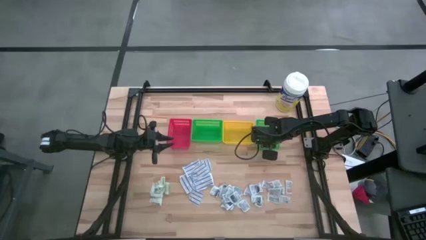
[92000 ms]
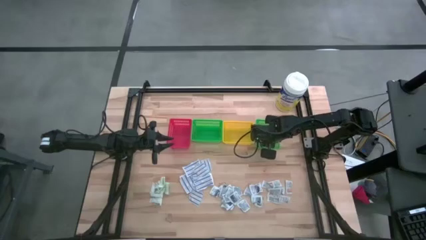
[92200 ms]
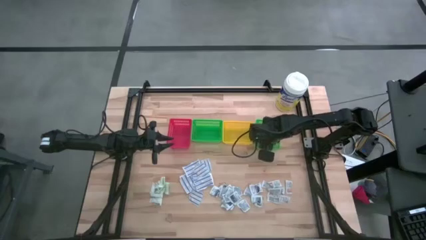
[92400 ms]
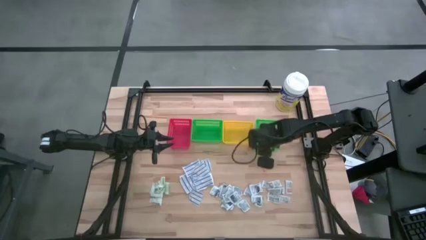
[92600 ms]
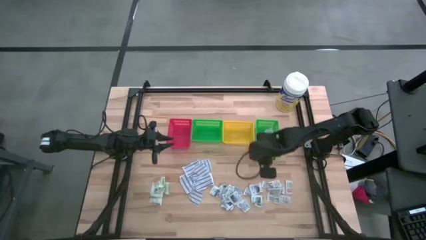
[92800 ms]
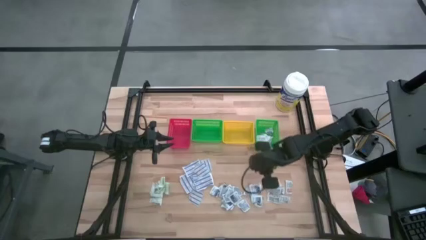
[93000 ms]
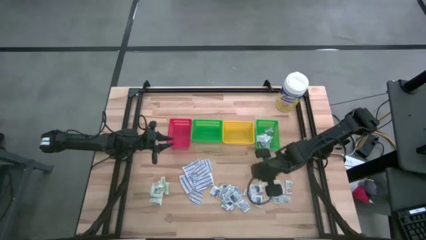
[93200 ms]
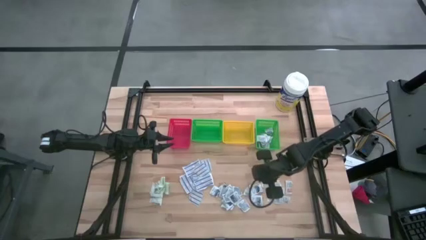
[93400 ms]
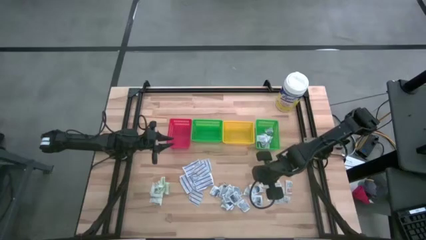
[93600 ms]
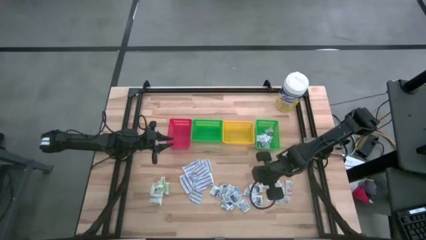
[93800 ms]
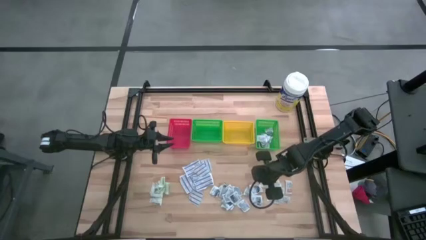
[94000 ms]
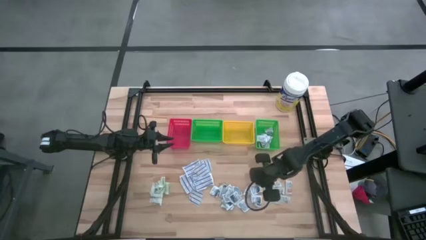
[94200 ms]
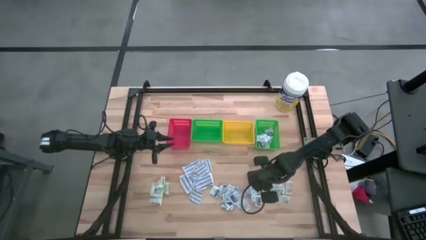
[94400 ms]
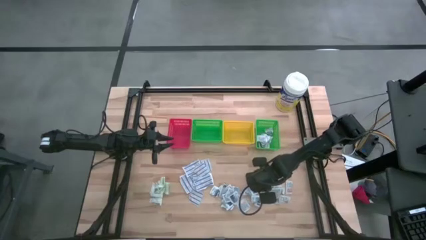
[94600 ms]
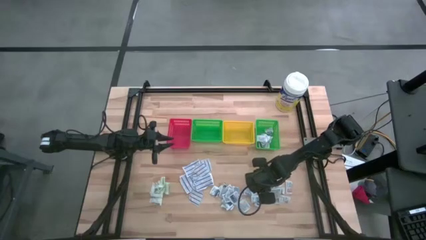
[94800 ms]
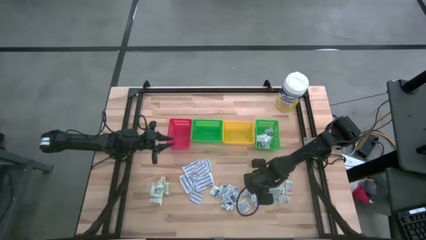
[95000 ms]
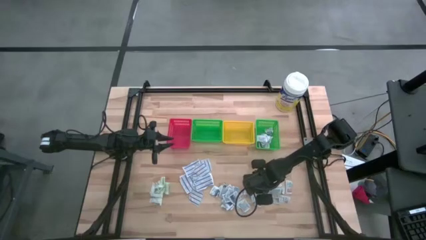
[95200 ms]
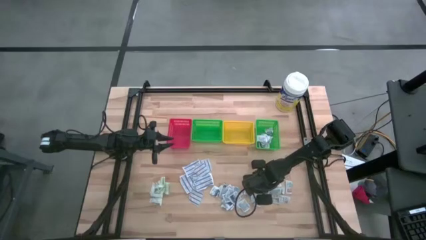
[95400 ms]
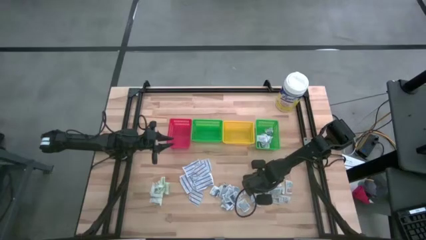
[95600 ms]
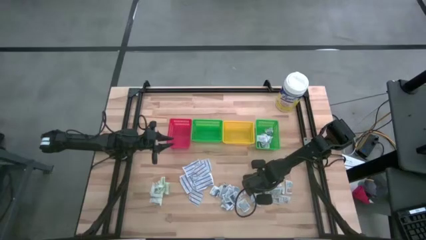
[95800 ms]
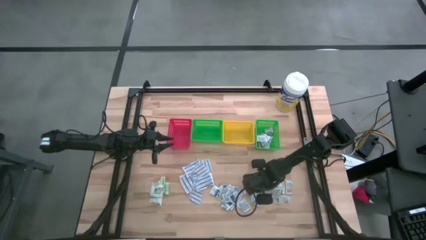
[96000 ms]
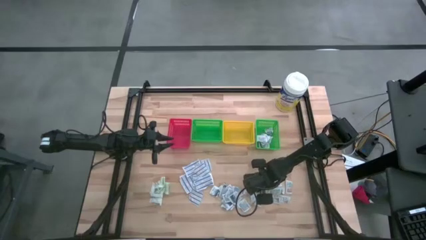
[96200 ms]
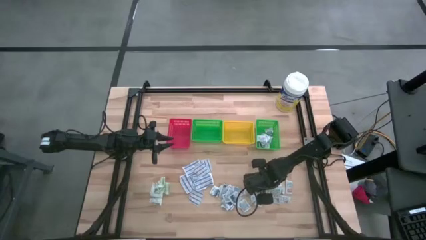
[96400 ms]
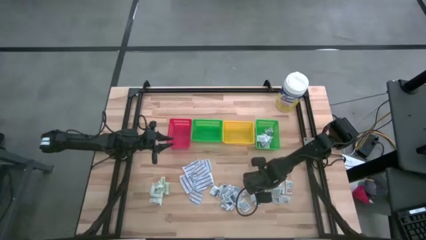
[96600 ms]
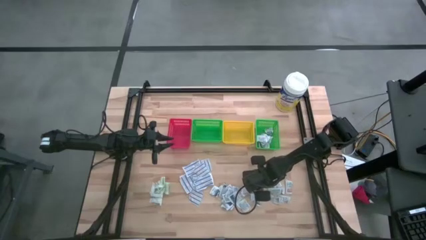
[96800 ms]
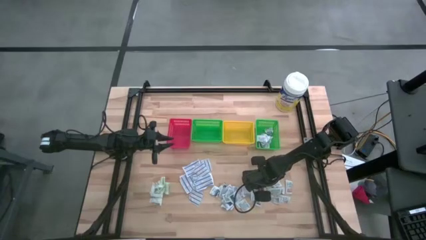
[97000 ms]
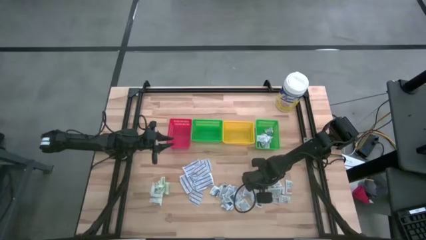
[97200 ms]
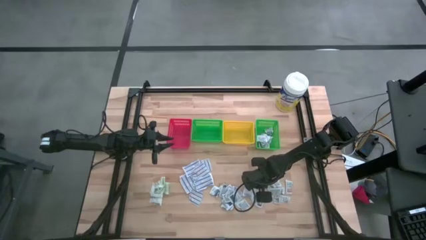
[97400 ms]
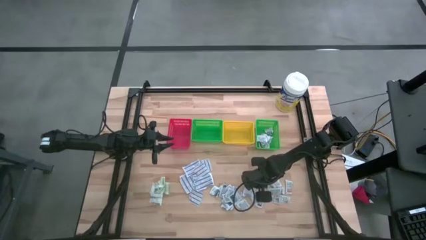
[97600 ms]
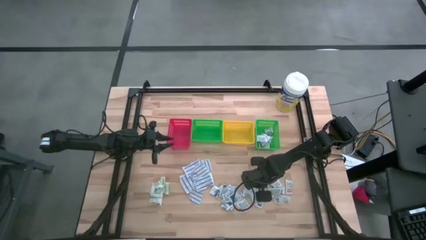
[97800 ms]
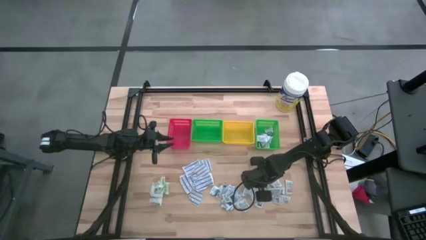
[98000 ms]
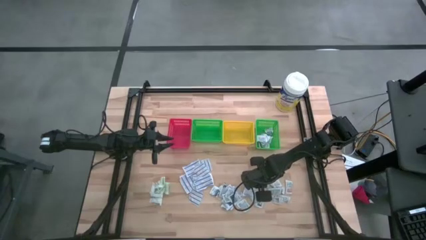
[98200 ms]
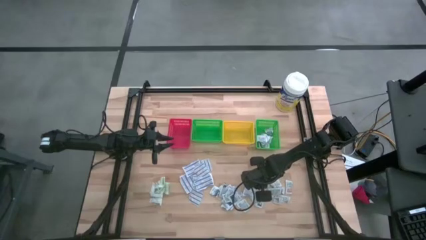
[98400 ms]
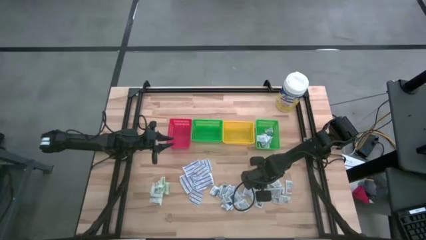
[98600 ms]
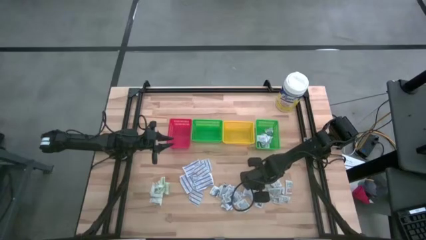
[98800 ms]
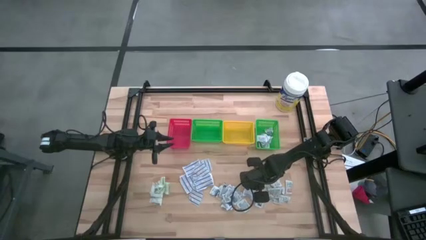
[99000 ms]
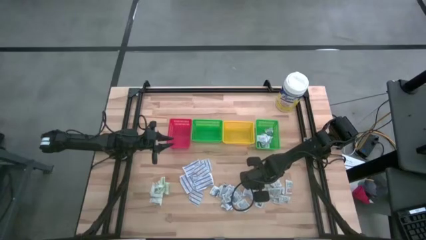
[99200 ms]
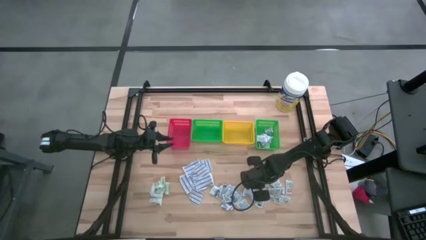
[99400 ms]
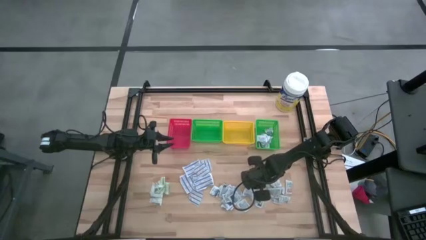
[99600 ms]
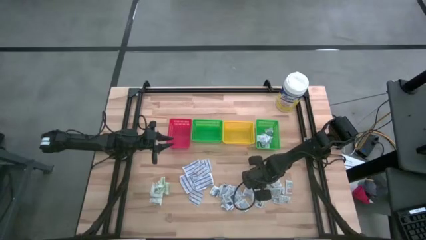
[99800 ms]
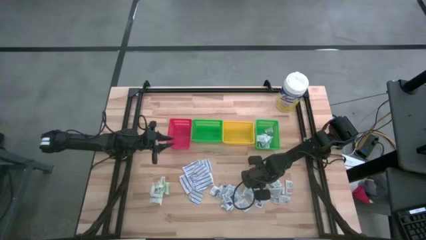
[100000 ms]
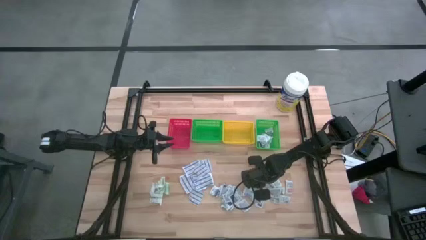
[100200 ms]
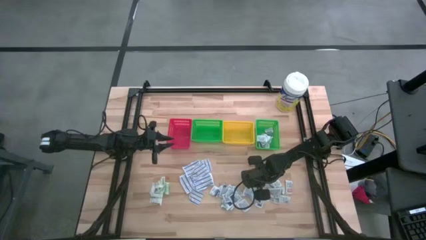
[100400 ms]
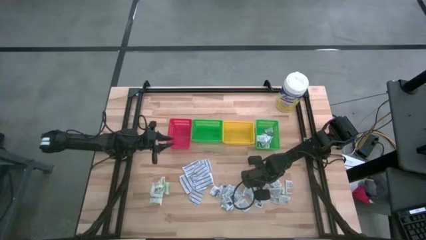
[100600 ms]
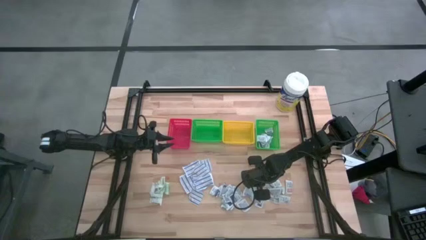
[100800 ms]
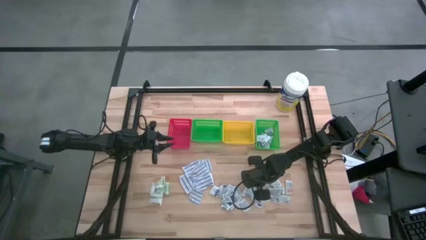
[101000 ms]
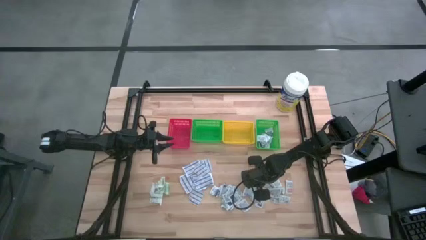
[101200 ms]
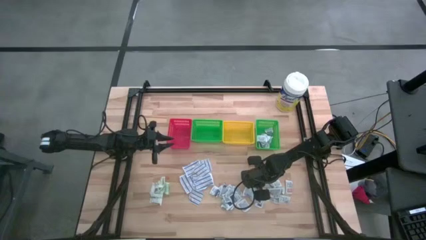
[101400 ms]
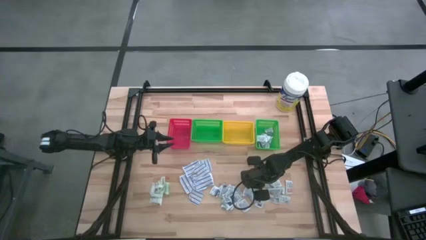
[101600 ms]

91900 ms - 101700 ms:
Task: Pick & Place First Aid Supplies
Put the blue alcohol pad into the right green bin

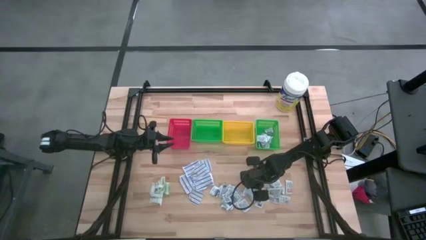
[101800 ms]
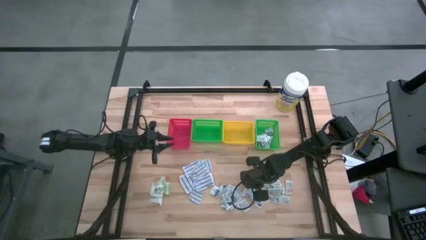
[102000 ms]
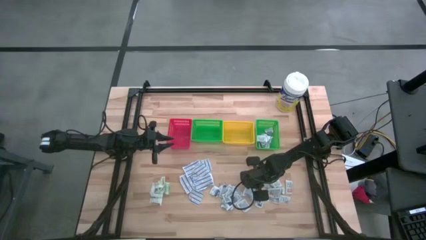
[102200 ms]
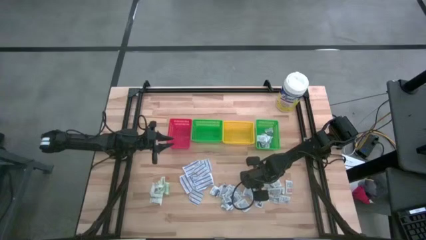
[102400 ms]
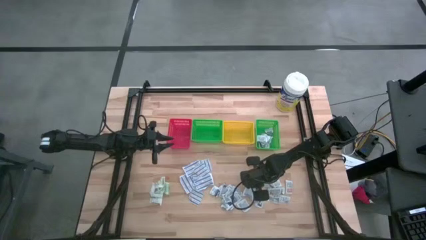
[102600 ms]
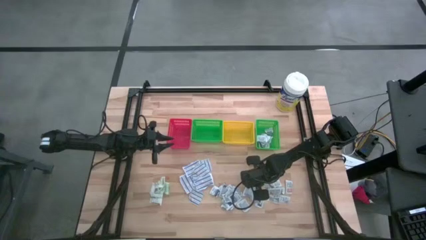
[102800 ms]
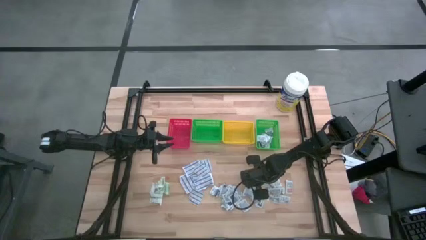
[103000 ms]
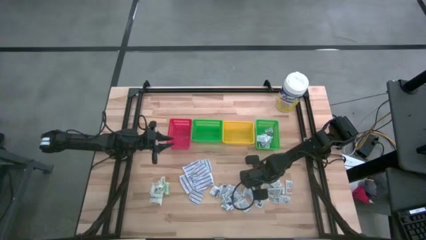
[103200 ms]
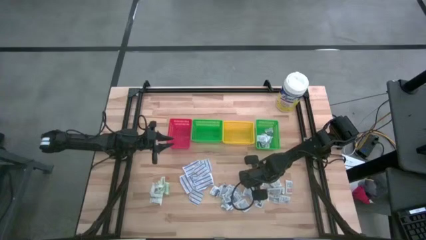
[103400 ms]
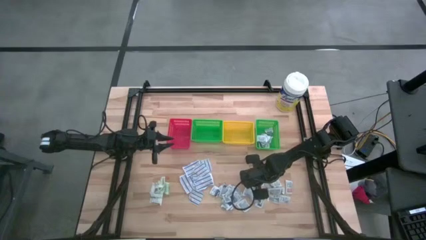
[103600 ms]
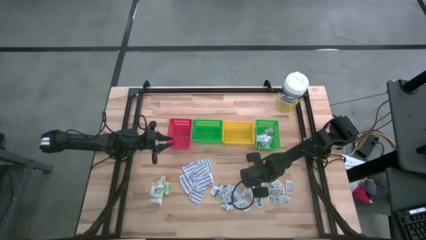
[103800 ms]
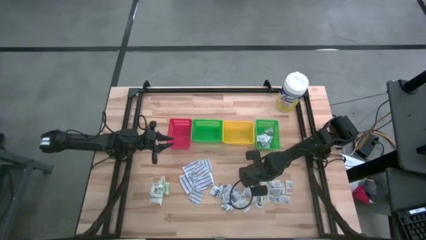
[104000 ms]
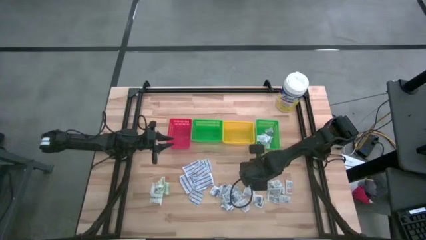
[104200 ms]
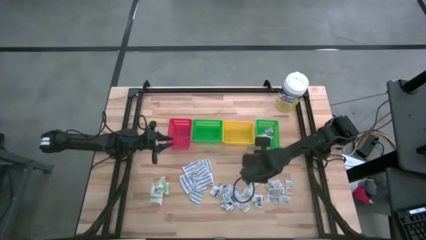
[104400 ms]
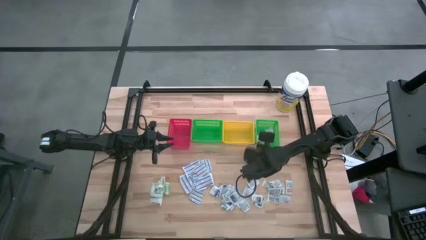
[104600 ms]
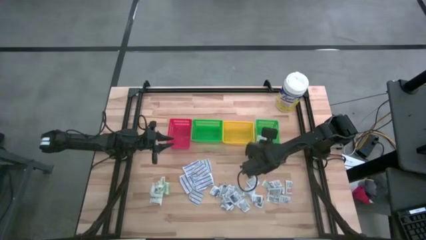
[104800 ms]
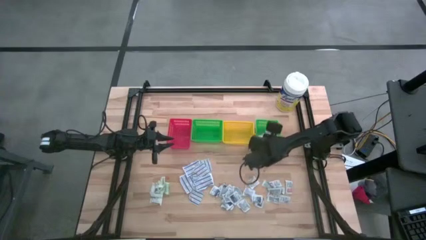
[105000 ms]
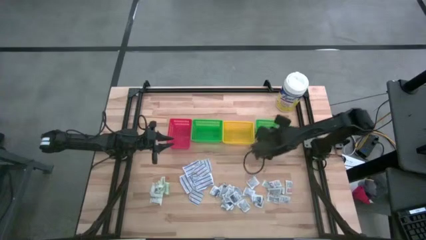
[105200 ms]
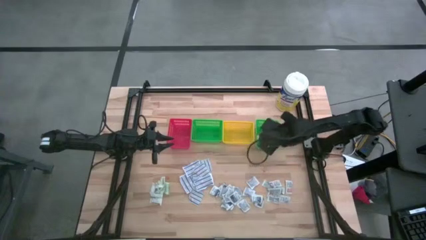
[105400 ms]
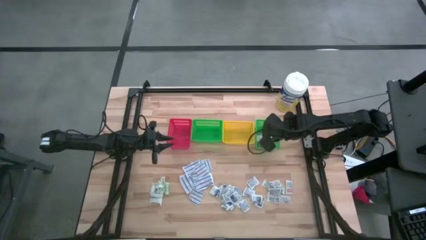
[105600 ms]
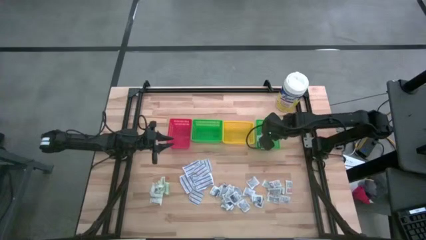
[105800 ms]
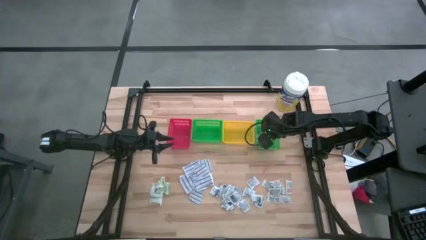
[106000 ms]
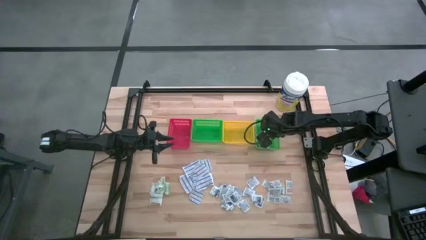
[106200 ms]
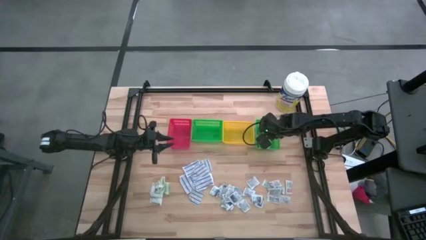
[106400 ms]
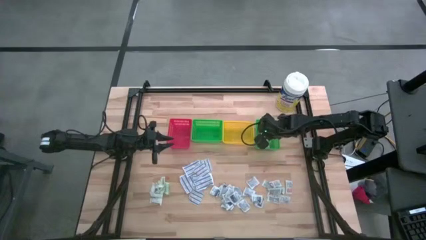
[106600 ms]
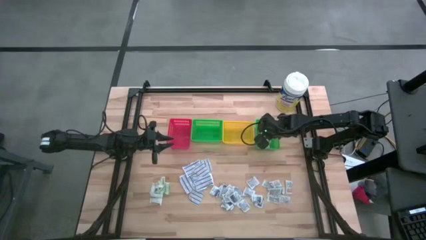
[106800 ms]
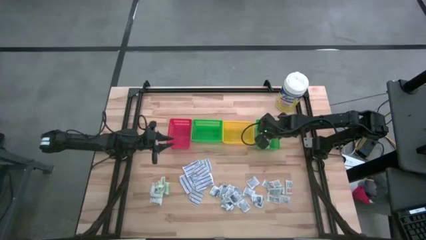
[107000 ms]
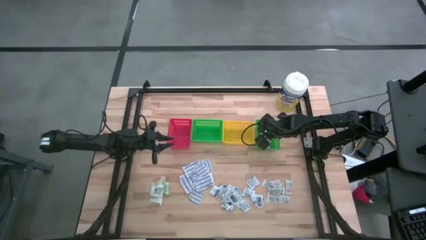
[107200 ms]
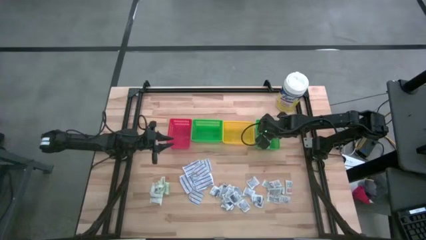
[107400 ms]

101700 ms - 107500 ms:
Put the blue alcohol pad into the right green bin

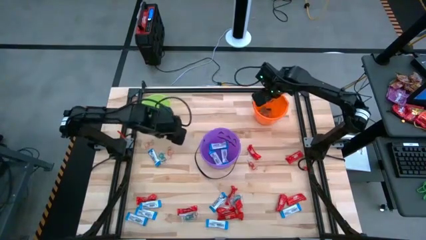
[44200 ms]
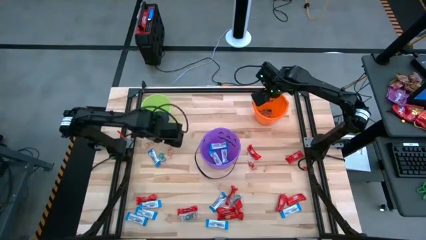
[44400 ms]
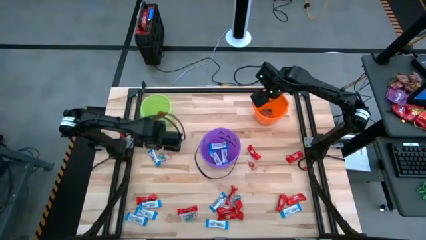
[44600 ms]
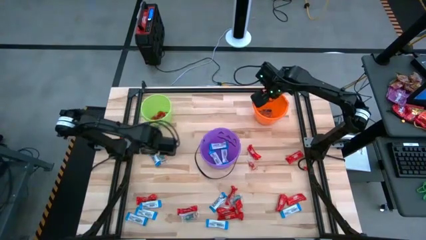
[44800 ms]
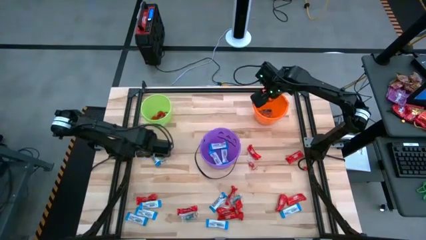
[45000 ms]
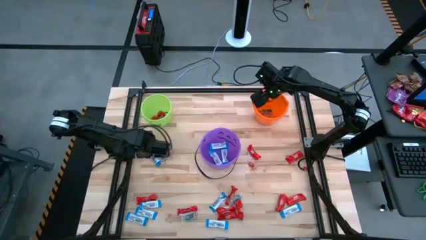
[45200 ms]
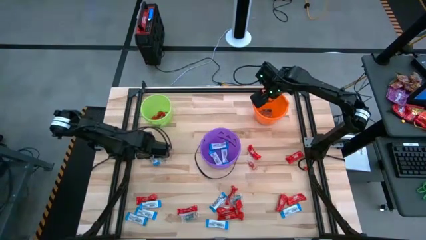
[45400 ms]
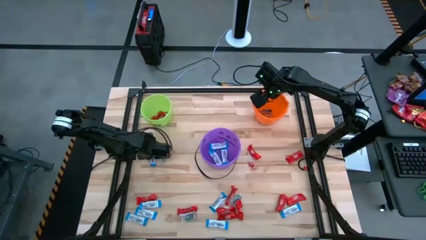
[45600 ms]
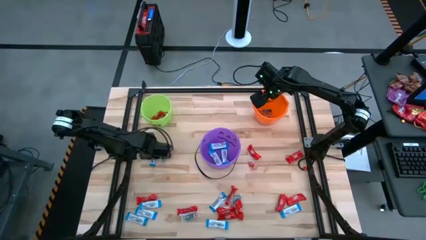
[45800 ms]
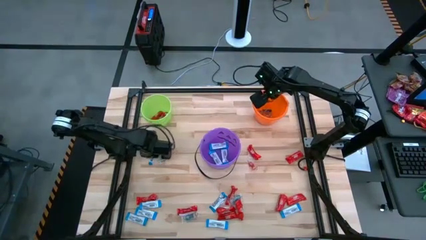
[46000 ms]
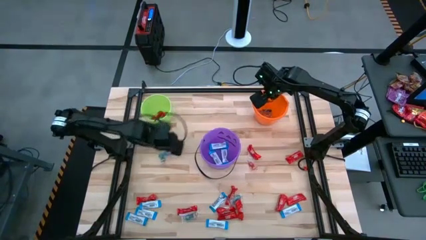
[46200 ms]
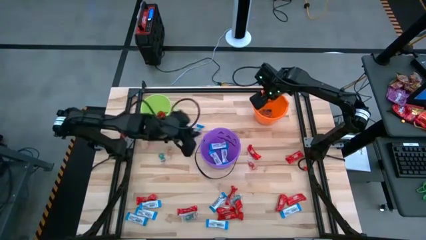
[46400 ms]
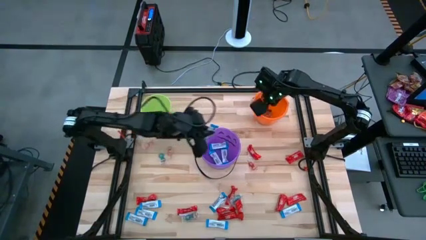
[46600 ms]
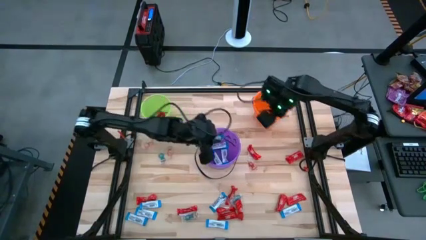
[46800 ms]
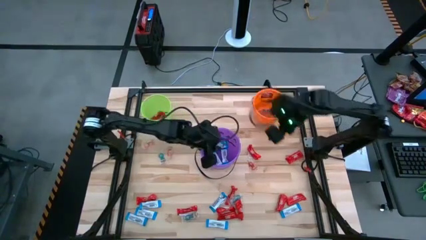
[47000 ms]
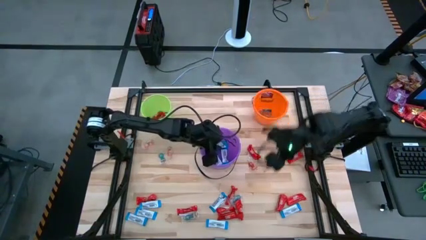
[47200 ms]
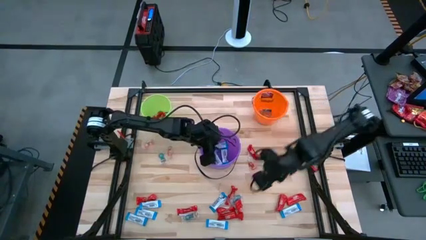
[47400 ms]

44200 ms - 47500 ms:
Task: Sort candy by brand, put in halloween buckets
Put the white chocolate into the purple bucket
